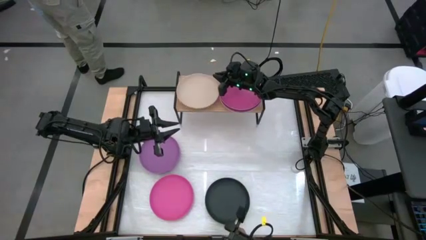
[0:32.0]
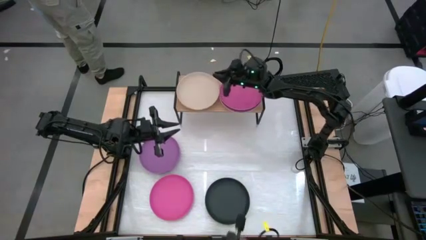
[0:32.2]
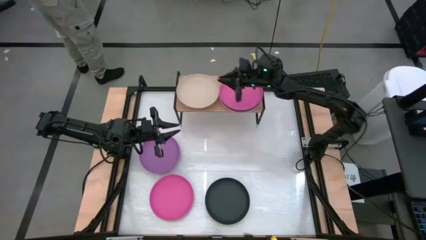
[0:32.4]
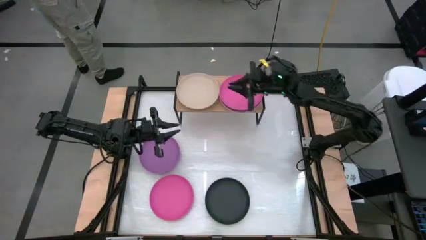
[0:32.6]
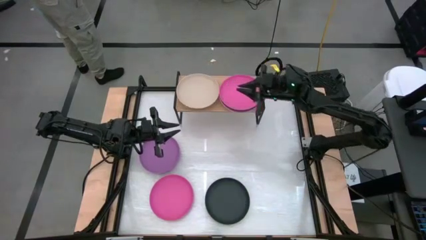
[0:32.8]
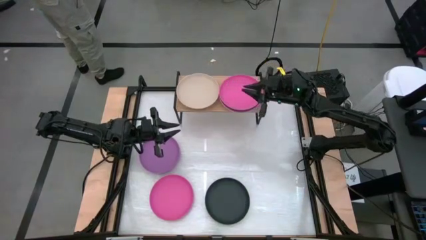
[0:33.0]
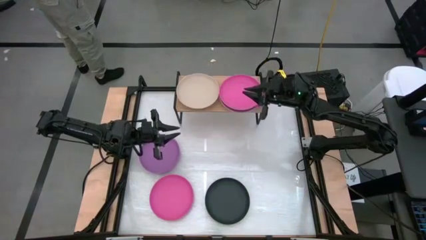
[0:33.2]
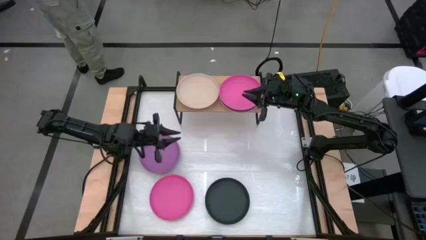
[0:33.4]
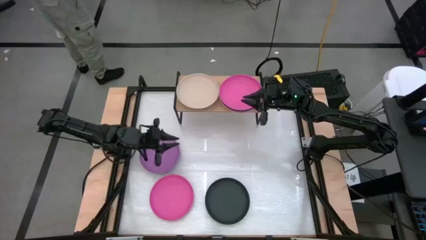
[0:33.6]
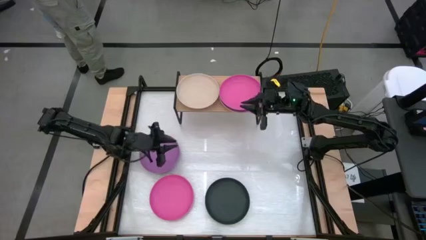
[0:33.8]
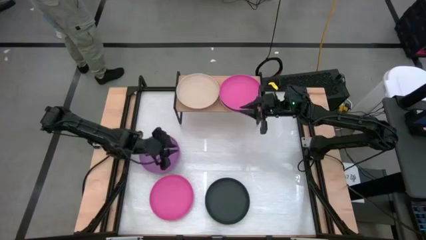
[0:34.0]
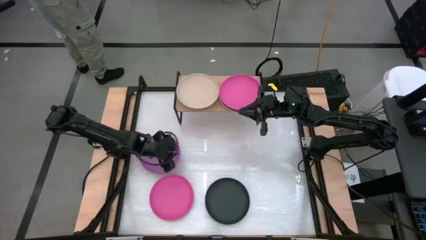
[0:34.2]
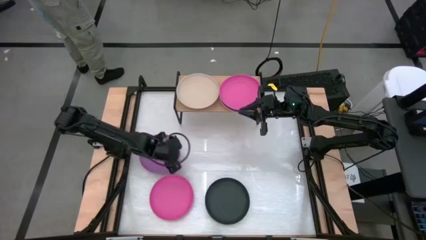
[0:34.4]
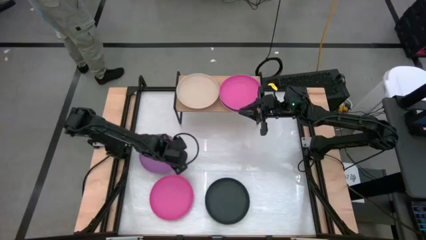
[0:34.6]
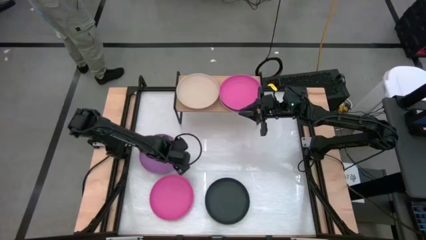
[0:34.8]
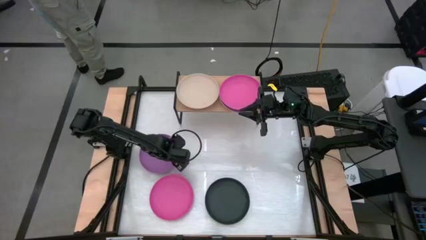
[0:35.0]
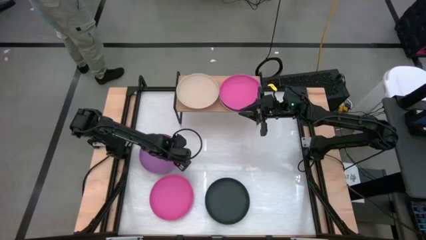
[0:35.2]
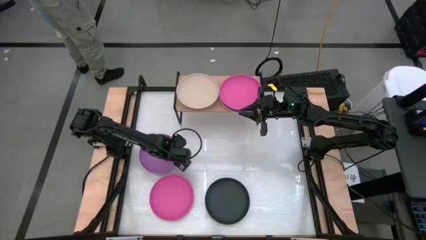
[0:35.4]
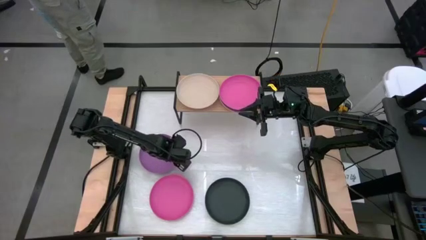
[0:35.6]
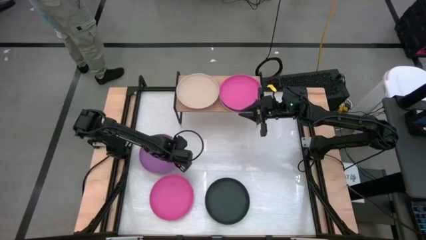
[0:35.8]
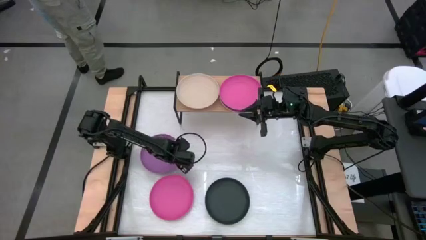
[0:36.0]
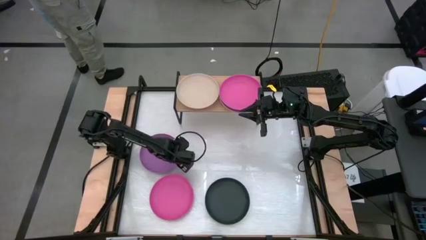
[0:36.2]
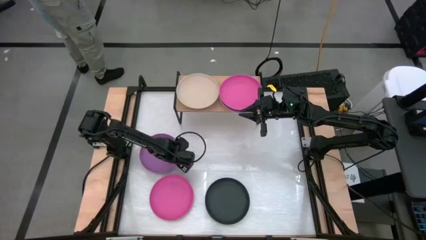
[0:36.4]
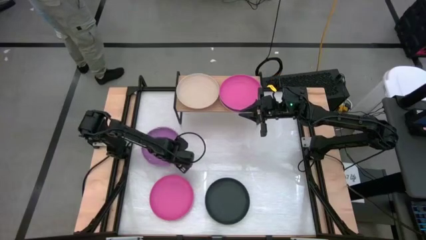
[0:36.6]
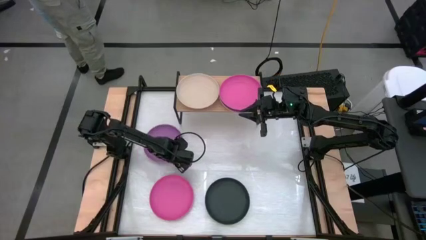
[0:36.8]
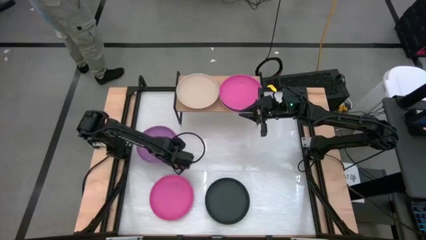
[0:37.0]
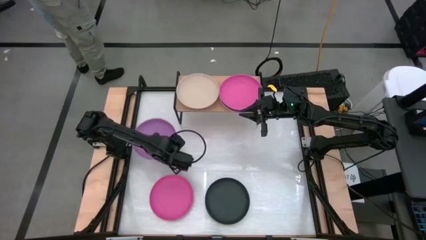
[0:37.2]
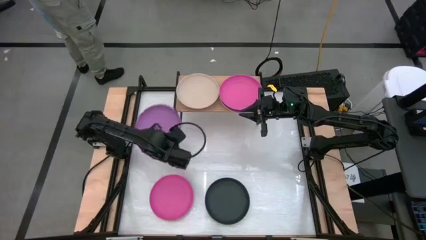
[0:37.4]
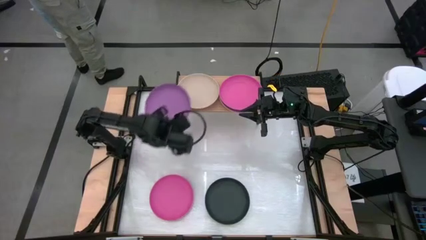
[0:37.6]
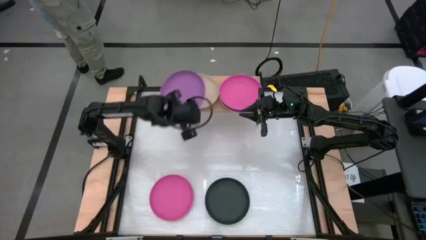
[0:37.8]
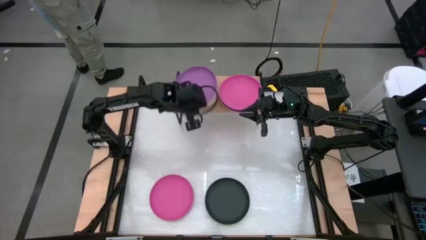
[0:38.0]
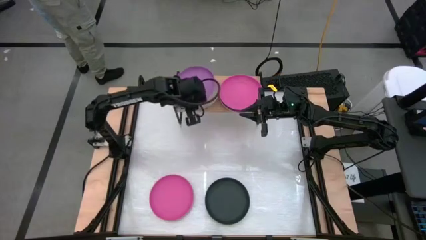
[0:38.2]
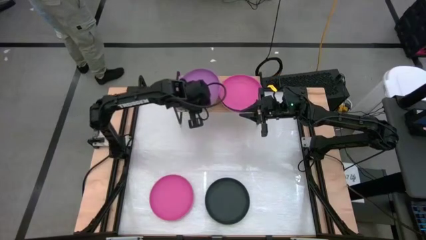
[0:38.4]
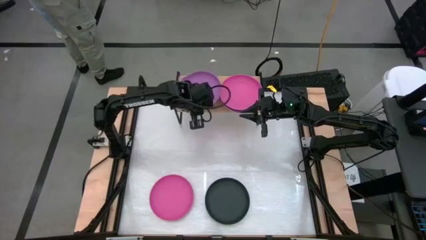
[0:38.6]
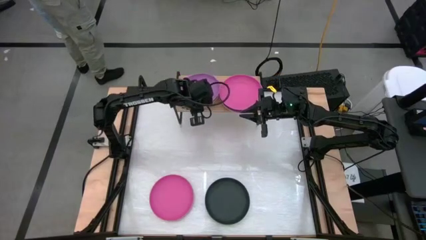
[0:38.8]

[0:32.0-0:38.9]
Task: Place and stack plates onto a shelf
Stack the purple plate on top of the light gray plate on the shelf

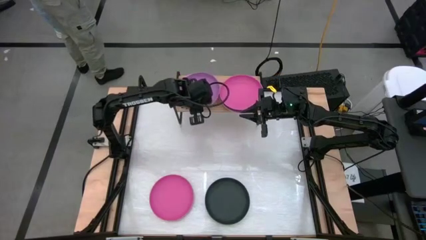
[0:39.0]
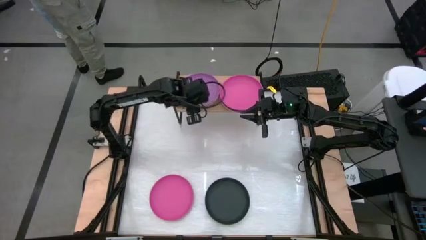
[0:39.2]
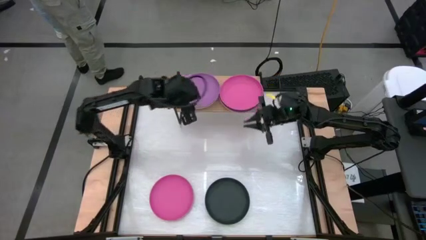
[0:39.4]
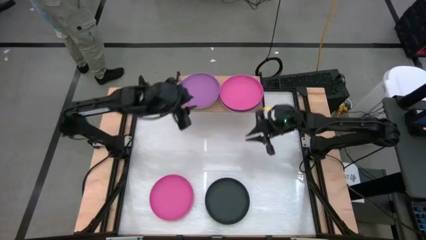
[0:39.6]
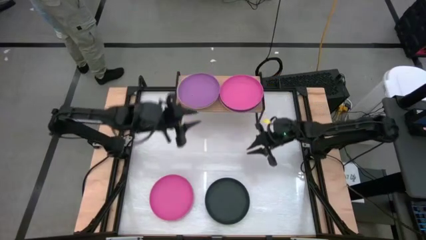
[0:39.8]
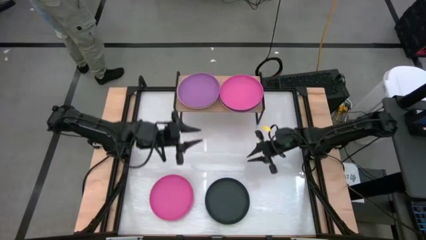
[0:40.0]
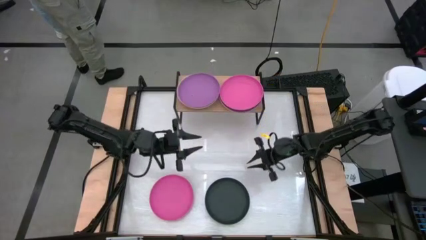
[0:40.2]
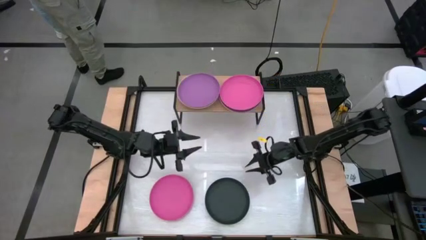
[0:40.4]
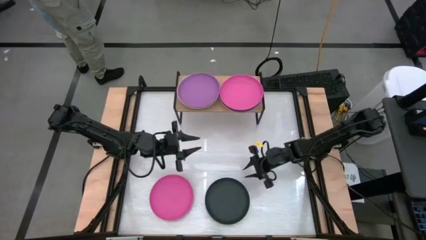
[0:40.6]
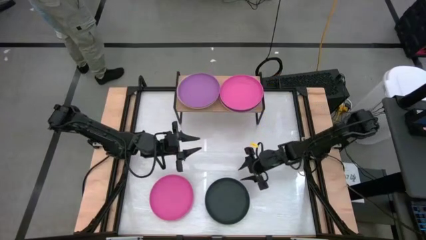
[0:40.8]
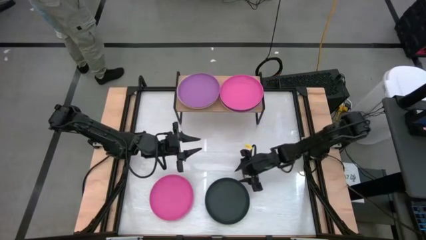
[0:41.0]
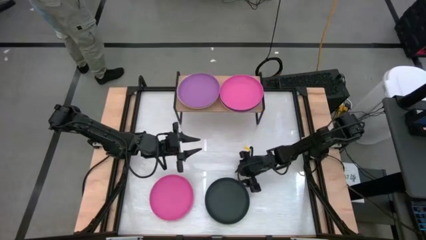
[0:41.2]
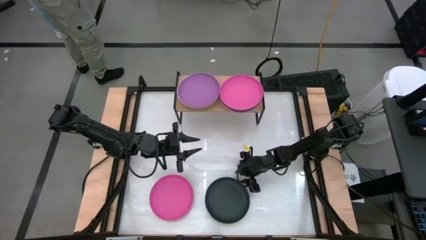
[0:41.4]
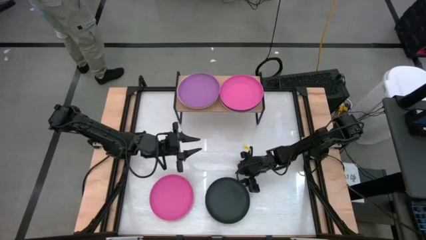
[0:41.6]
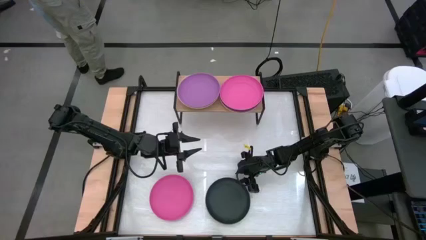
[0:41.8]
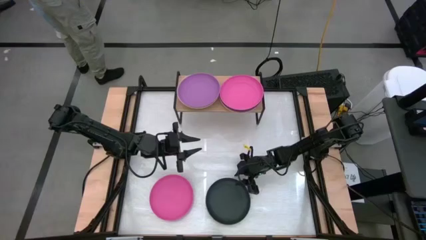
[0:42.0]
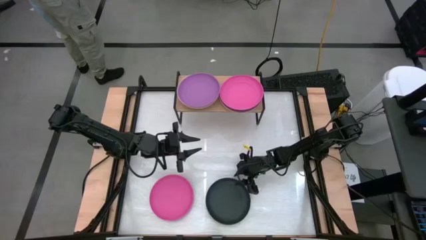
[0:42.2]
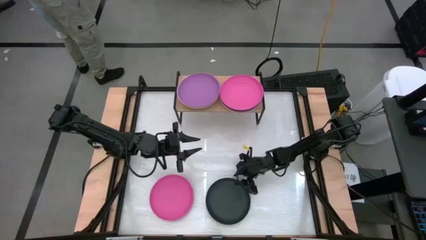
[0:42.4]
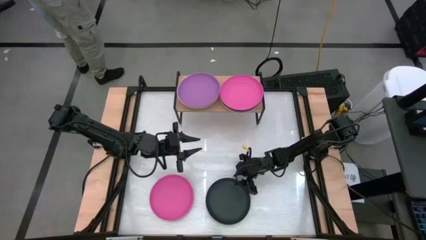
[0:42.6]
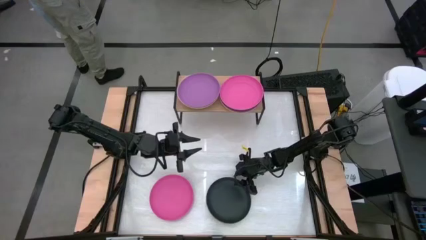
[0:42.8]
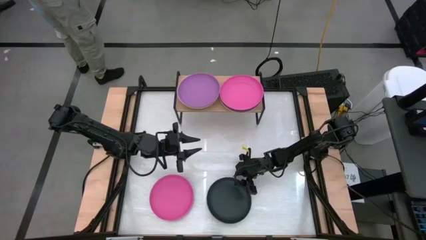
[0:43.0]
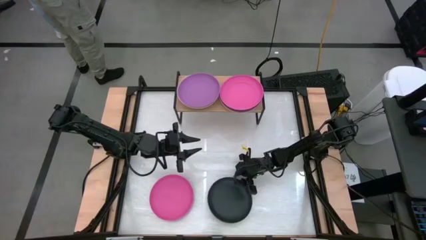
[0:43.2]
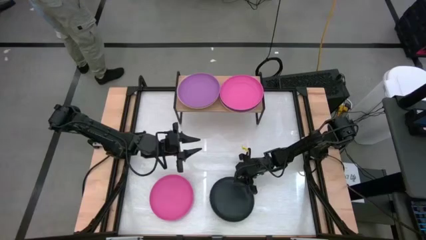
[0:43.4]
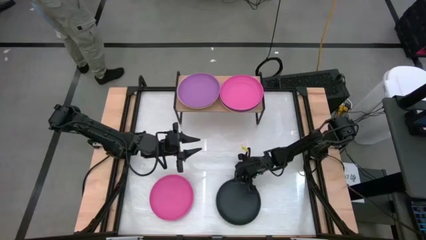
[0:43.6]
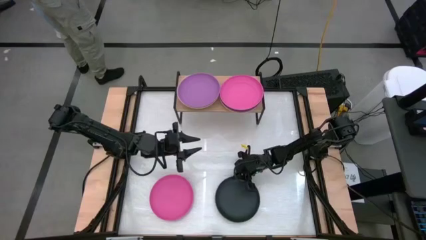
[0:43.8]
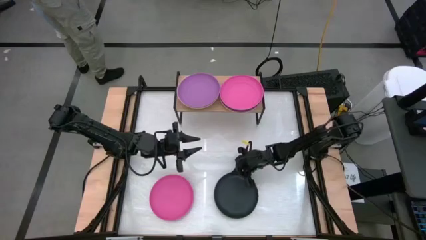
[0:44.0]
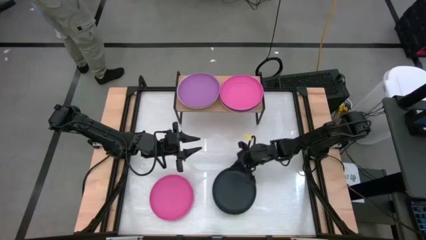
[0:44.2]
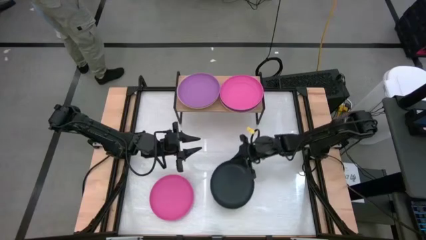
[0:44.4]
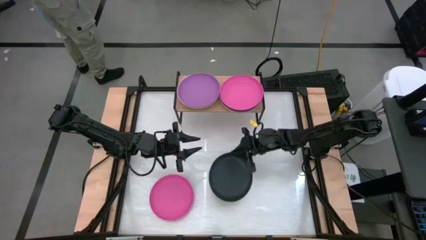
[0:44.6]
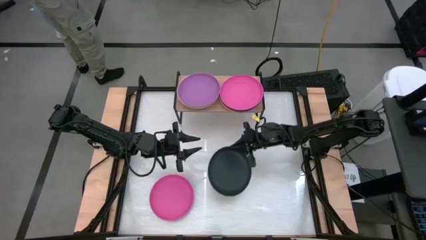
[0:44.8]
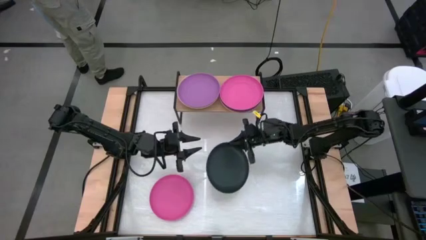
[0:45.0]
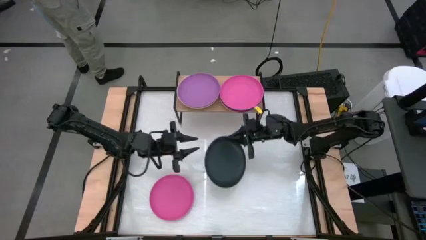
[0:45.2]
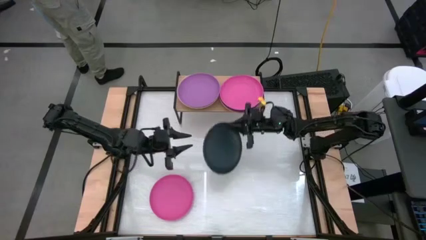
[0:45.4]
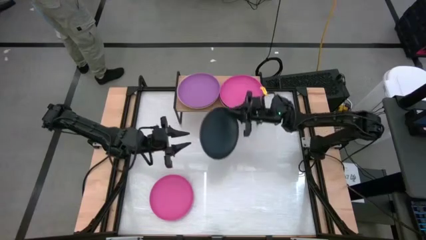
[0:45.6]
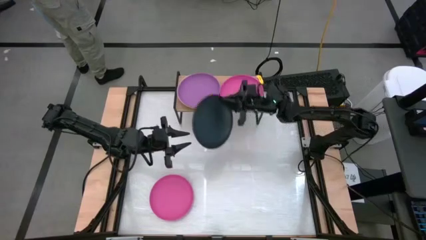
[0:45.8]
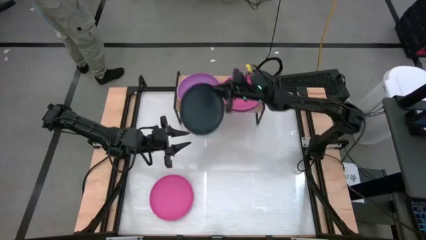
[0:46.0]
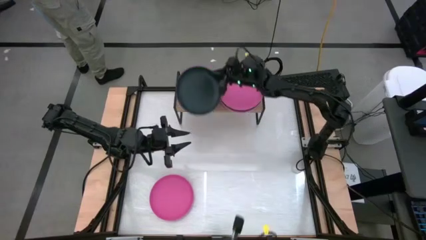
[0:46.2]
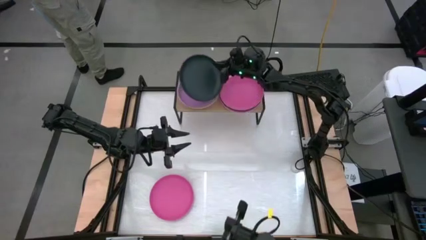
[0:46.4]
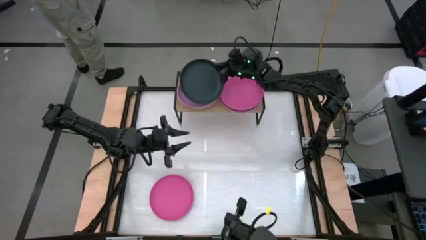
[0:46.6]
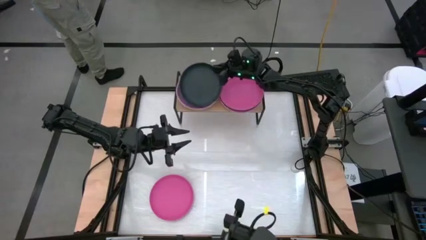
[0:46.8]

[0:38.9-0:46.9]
Stack the black plate on top of the purple plate on the shelf

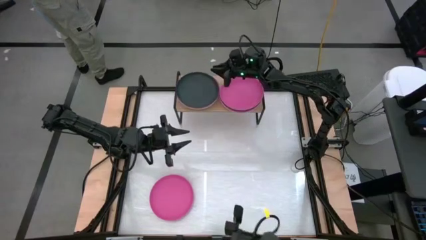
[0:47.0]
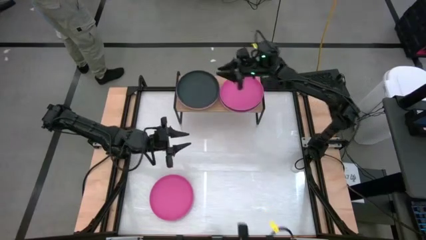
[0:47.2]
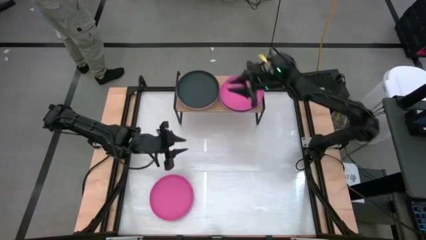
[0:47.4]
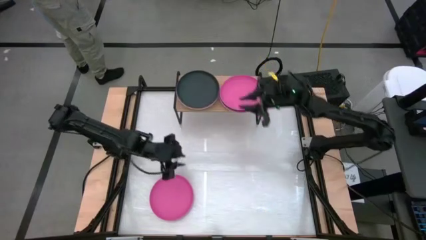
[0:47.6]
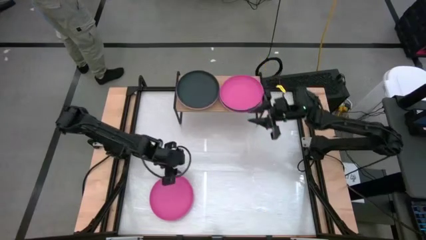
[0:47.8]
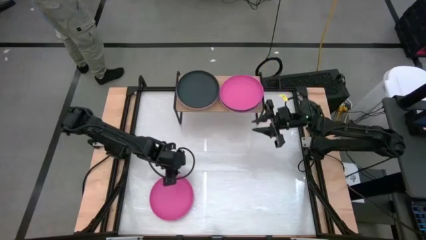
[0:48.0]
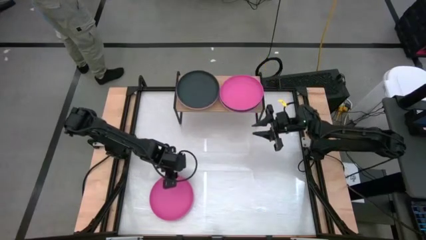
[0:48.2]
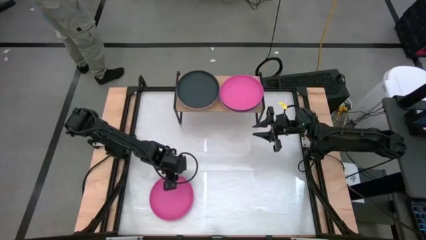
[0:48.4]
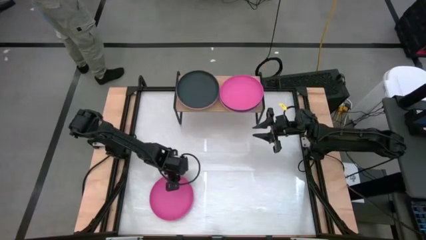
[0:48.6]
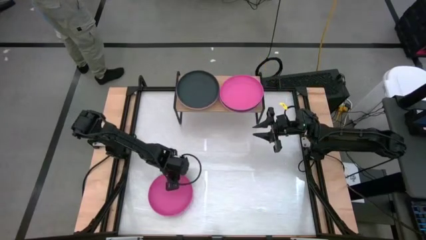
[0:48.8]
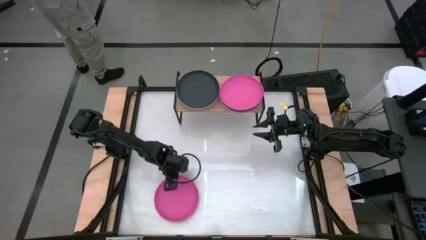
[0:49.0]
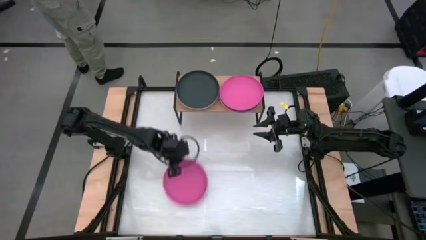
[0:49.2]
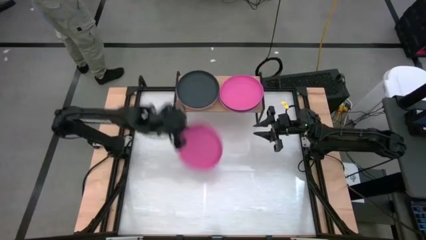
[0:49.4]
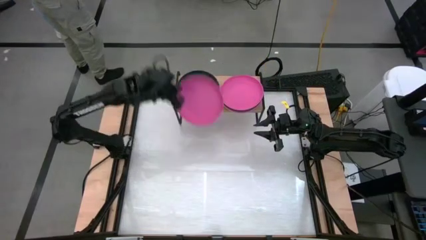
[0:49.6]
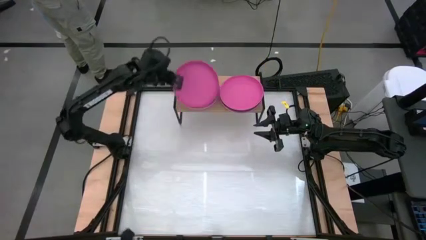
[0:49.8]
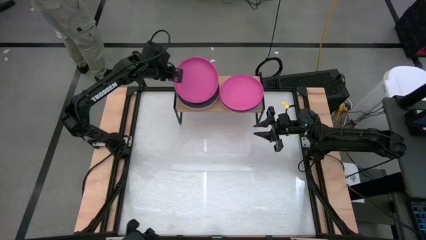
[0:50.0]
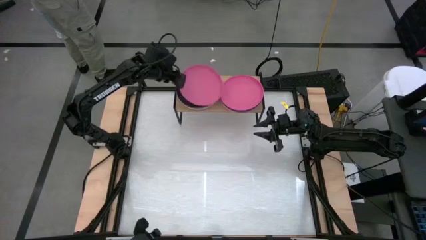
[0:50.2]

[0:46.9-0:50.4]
Stack the pink plate on top of the black plate on the shelf
